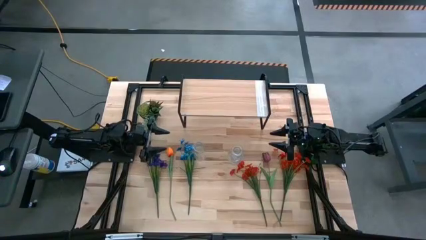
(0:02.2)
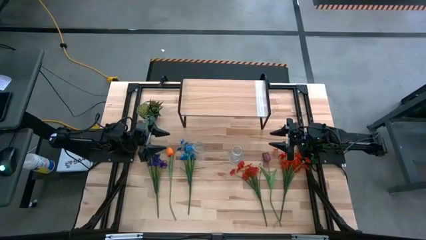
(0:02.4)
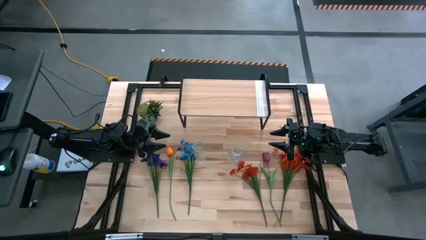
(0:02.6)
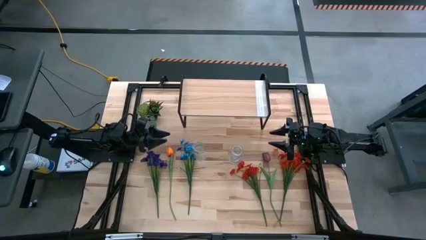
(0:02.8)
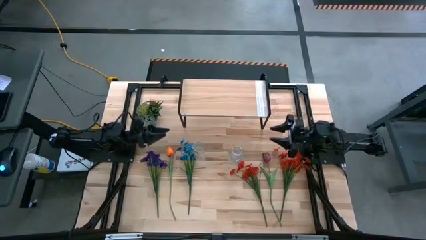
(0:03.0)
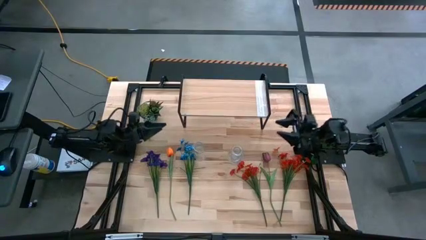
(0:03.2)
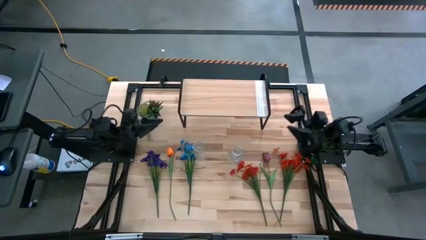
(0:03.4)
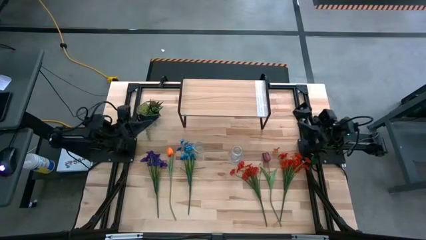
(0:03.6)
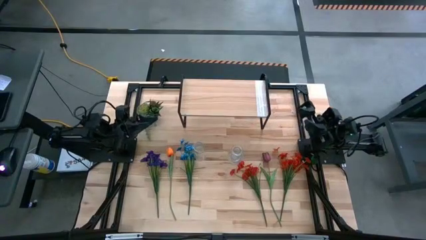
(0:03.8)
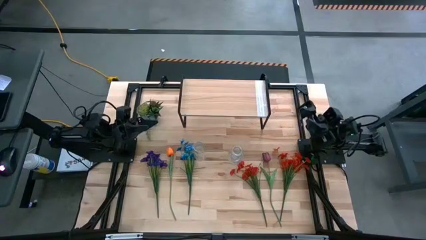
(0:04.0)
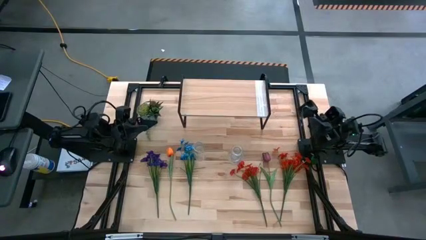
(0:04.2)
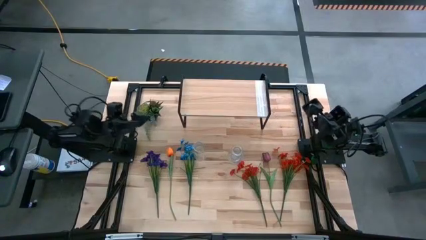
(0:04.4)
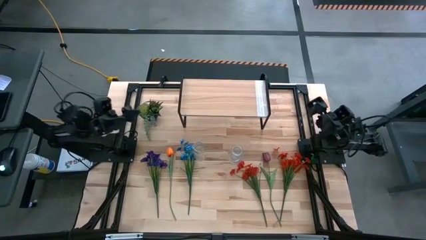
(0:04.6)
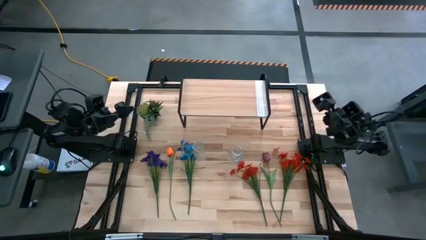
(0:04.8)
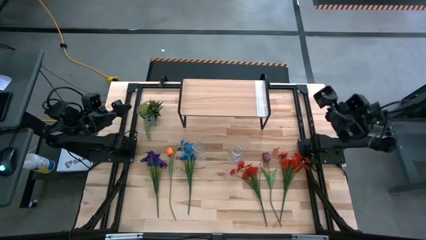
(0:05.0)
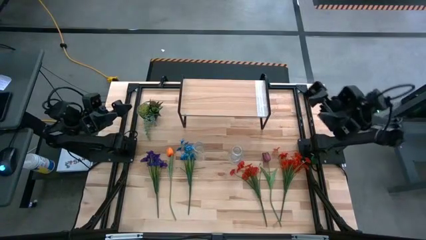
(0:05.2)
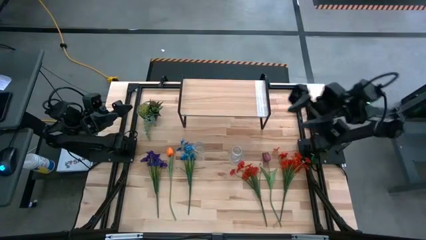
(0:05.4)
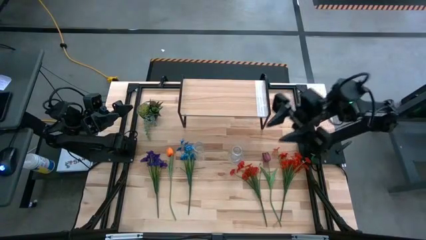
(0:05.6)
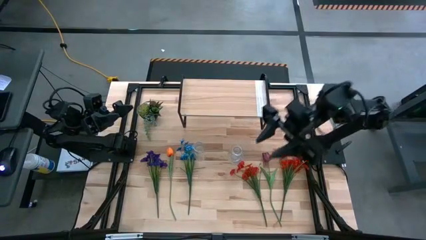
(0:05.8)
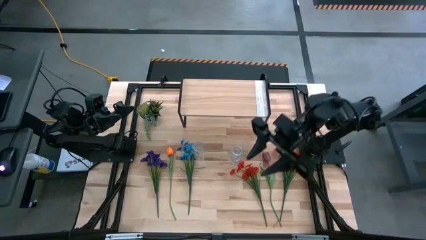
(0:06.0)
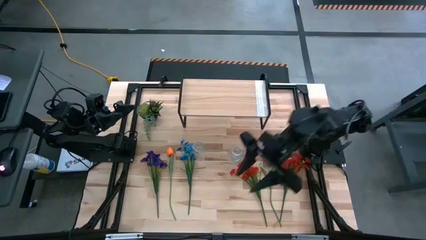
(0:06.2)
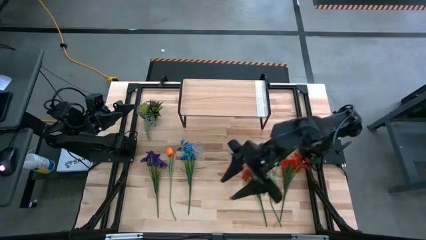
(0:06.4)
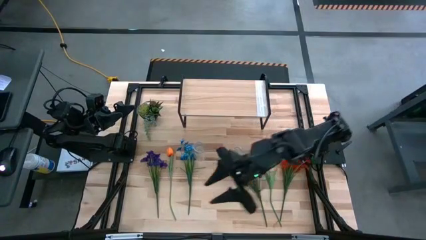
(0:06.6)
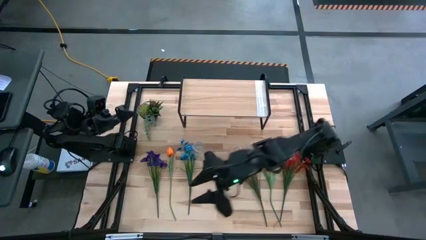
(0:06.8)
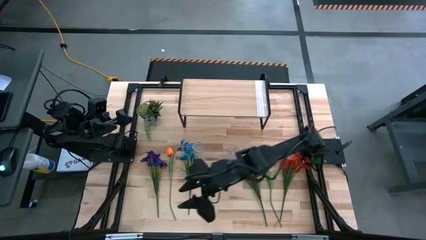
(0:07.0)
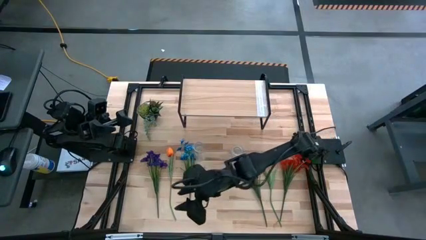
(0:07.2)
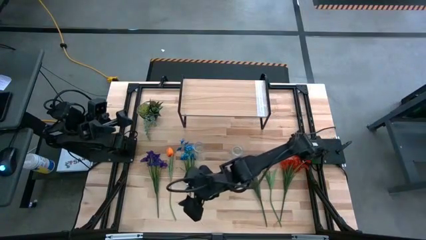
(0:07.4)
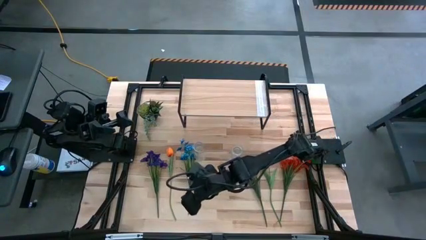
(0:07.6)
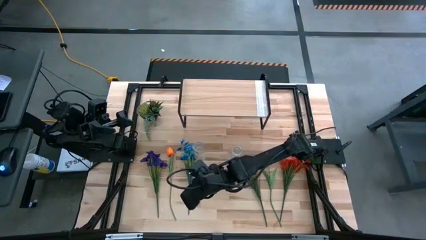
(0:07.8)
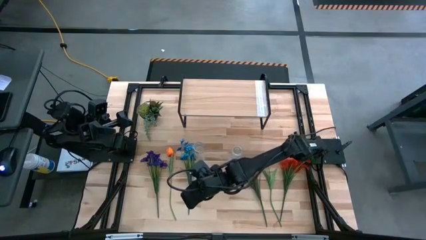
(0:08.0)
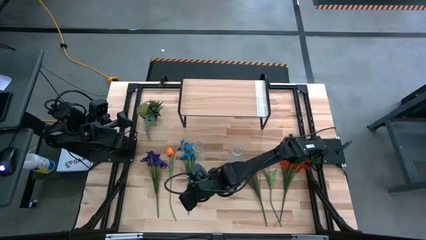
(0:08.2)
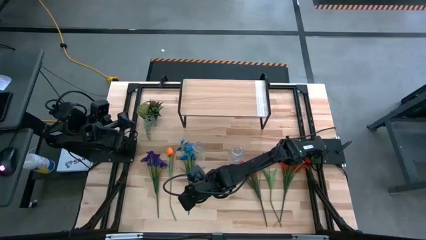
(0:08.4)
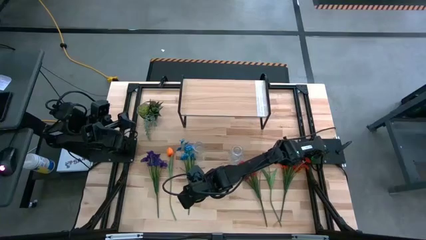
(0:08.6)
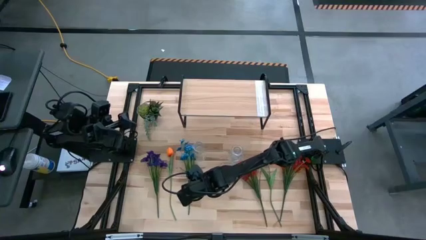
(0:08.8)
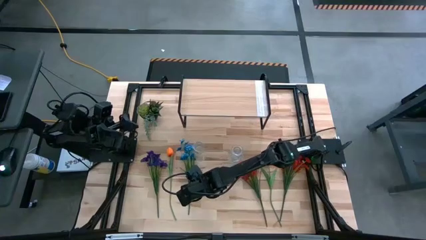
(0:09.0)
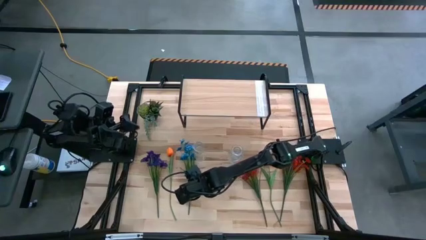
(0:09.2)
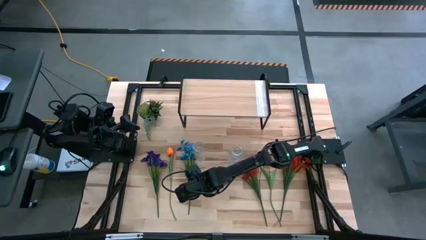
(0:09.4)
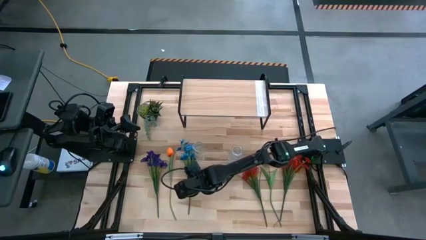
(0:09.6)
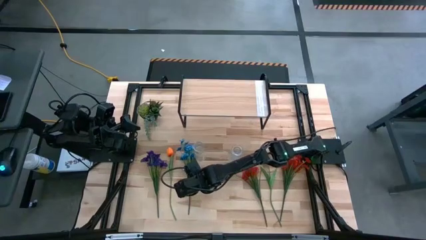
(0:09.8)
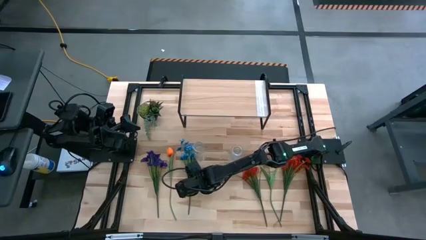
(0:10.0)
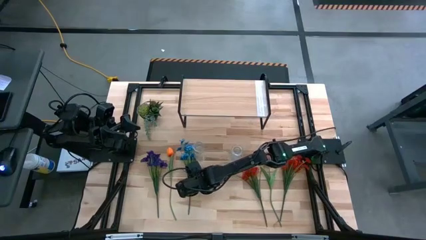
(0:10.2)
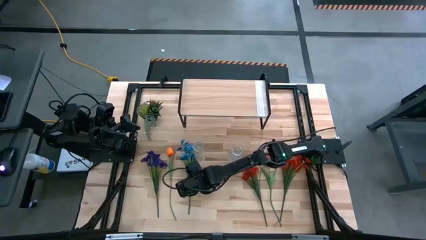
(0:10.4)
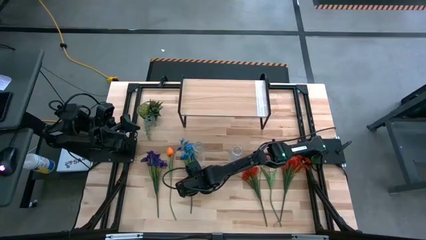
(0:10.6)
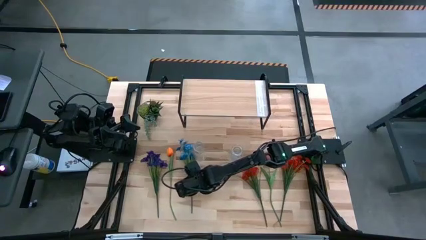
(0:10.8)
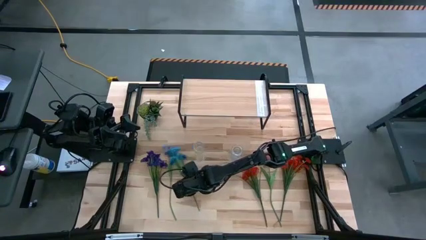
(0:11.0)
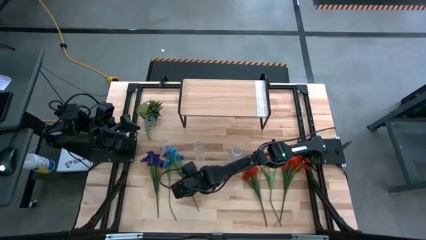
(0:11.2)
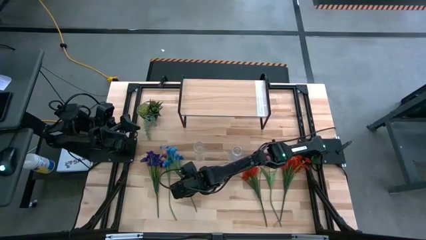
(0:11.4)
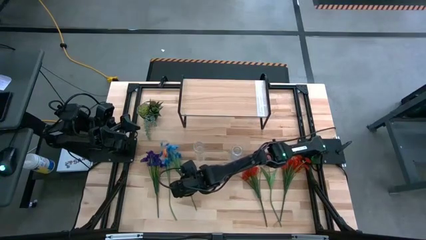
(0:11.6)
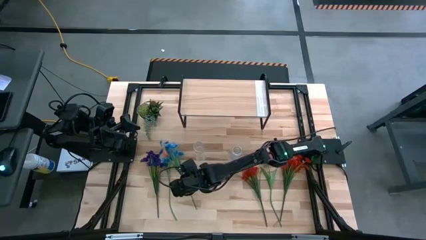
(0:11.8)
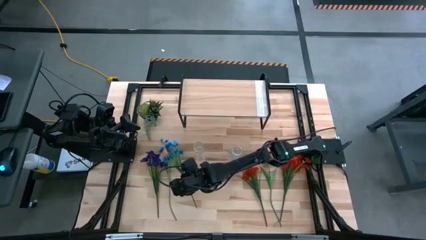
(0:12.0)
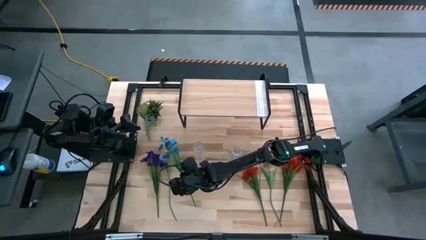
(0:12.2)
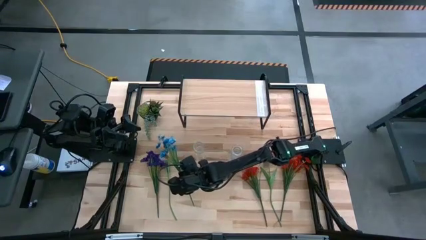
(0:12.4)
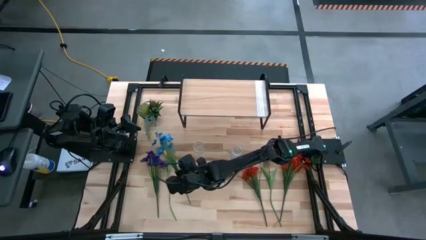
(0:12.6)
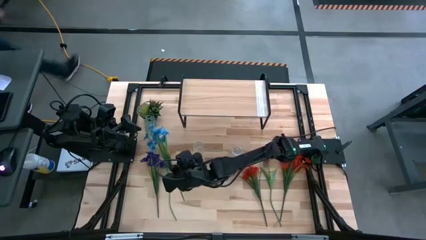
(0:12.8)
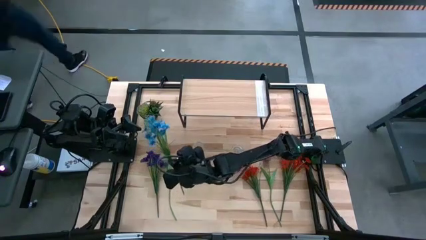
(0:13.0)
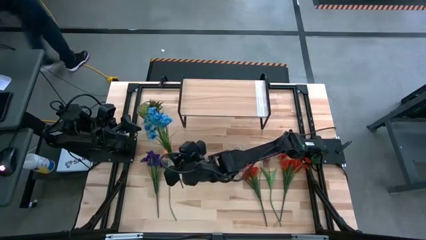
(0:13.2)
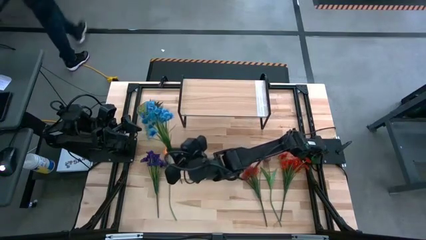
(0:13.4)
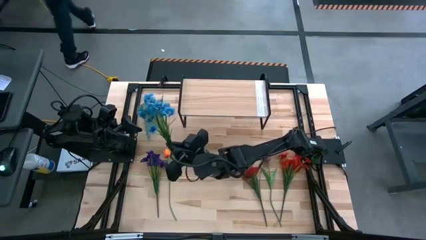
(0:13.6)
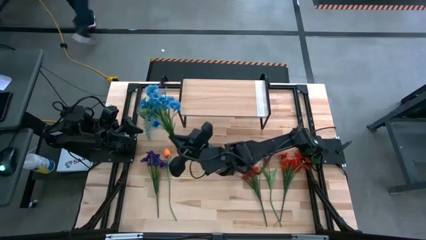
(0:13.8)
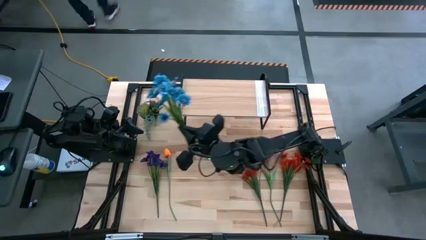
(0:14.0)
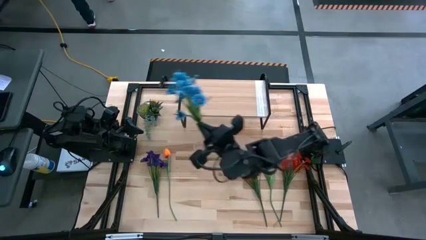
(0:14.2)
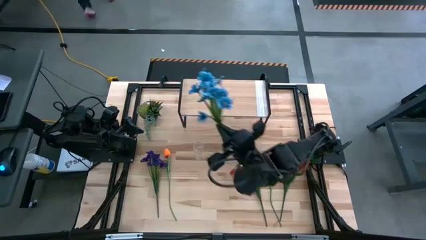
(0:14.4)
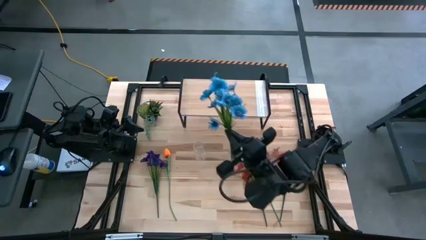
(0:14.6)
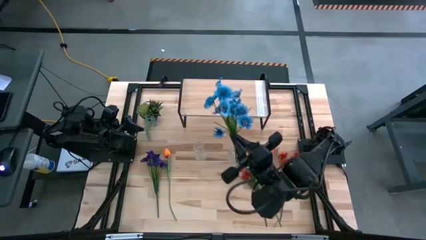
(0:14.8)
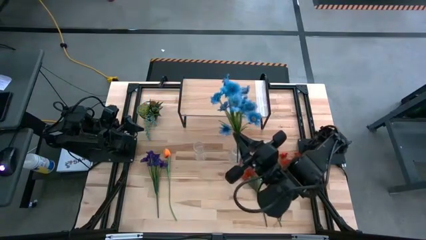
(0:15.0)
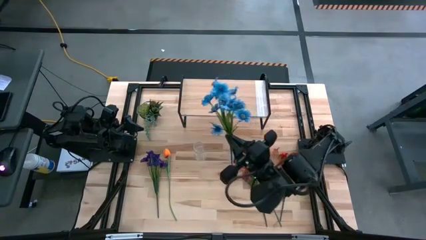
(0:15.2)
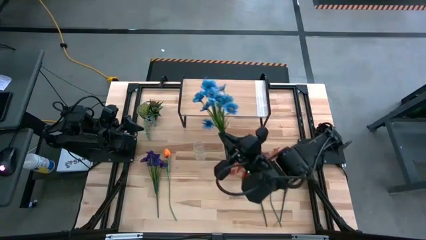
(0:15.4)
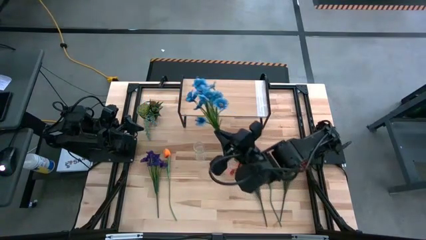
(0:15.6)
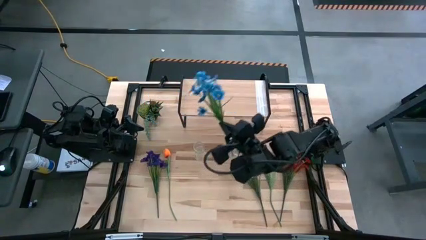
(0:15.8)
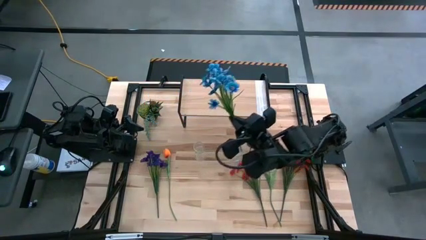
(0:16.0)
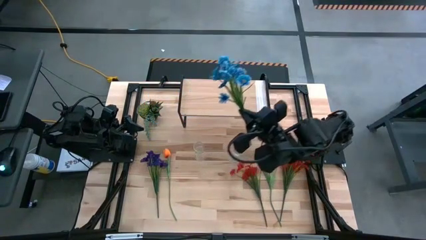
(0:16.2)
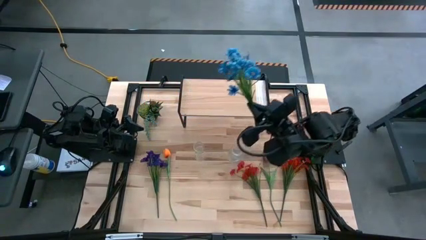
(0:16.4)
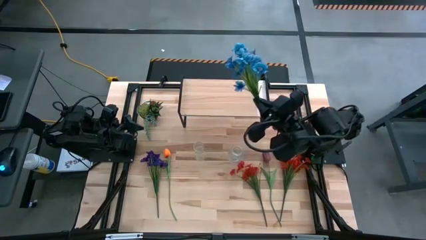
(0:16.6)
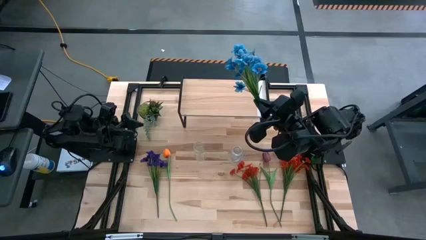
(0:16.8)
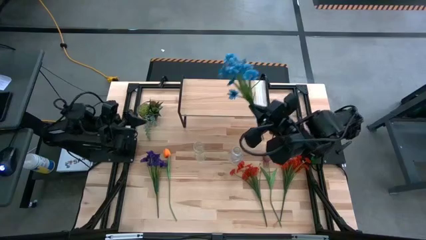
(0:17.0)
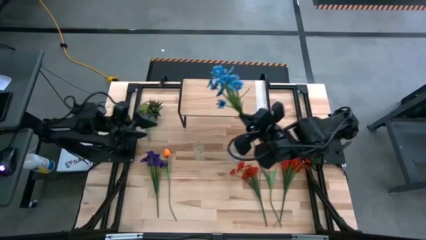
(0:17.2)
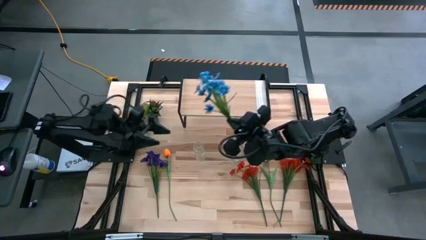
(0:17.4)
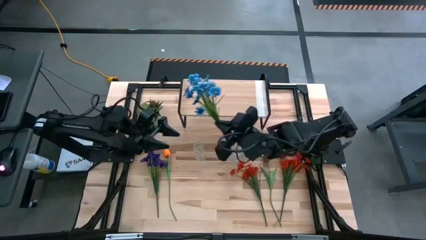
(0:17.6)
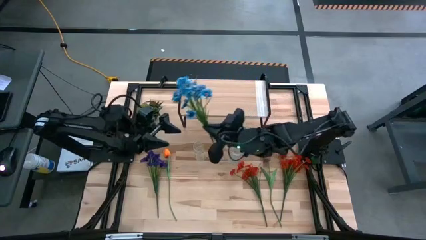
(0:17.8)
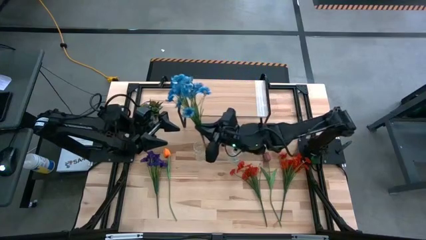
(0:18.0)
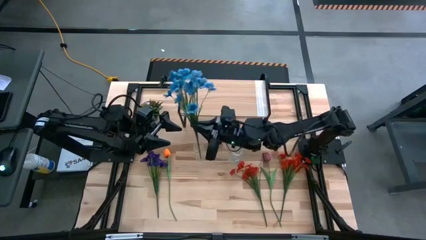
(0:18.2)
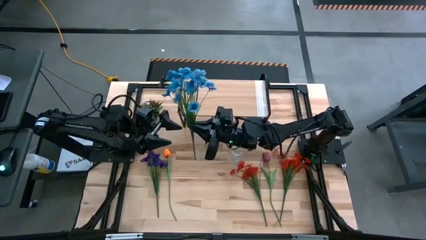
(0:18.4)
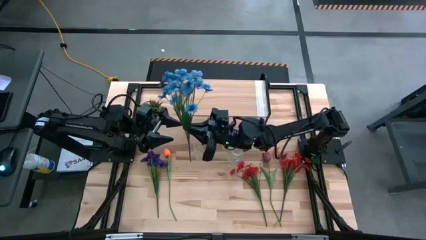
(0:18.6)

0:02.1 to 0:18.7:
Task: Pick and place flowers into a vace then onto a shelf
Put the blue flower into the left transparent crystal vase
